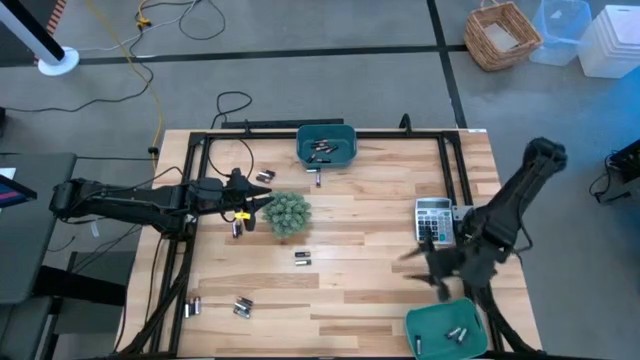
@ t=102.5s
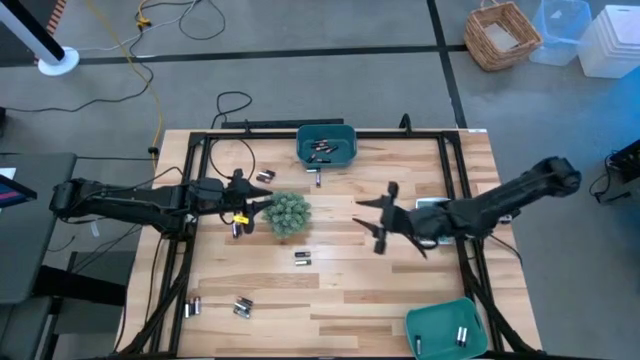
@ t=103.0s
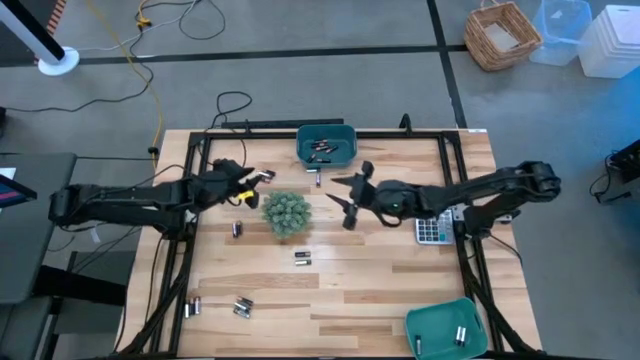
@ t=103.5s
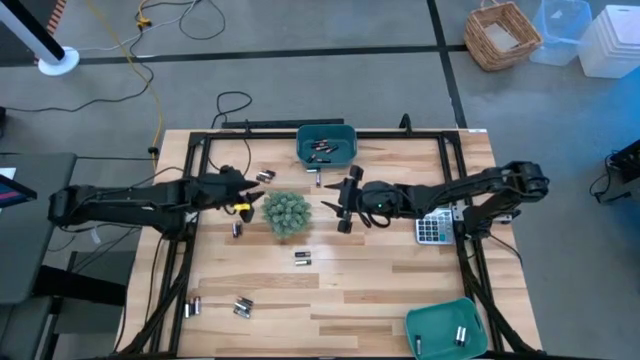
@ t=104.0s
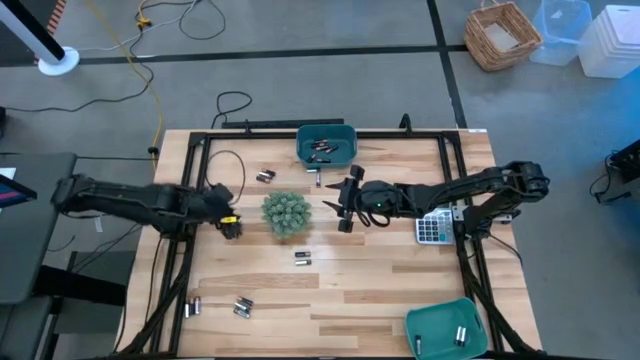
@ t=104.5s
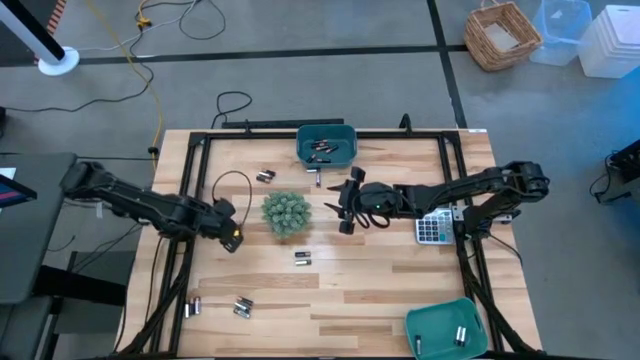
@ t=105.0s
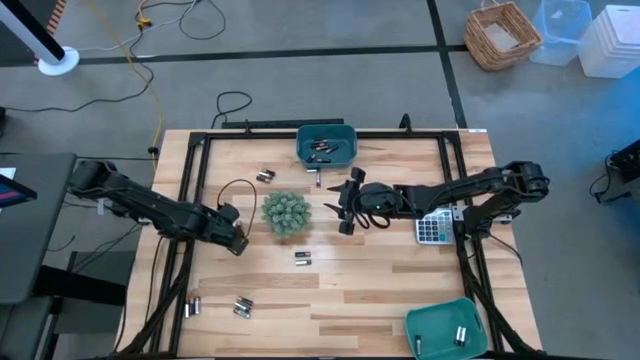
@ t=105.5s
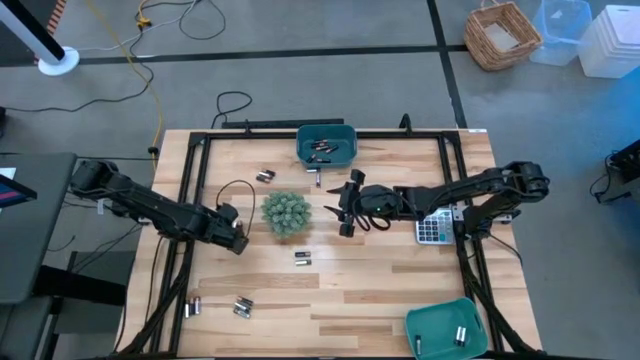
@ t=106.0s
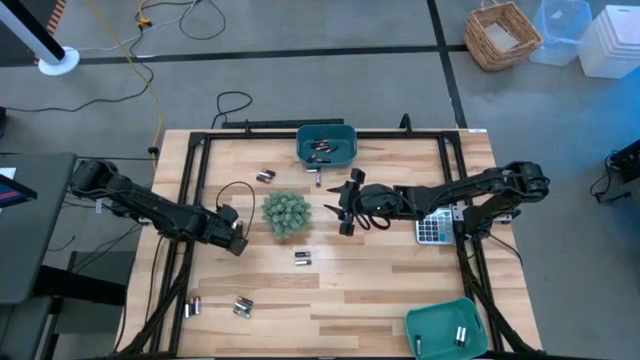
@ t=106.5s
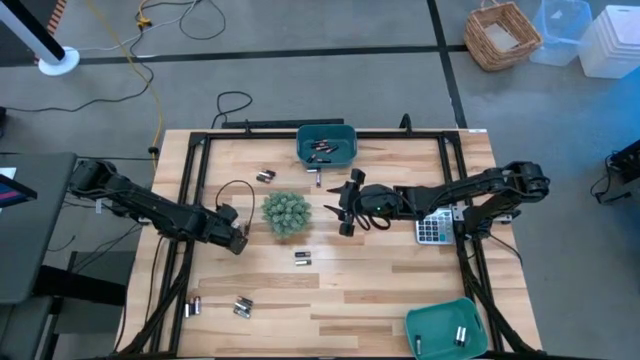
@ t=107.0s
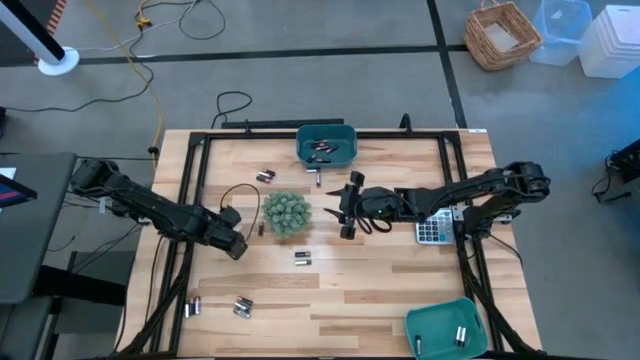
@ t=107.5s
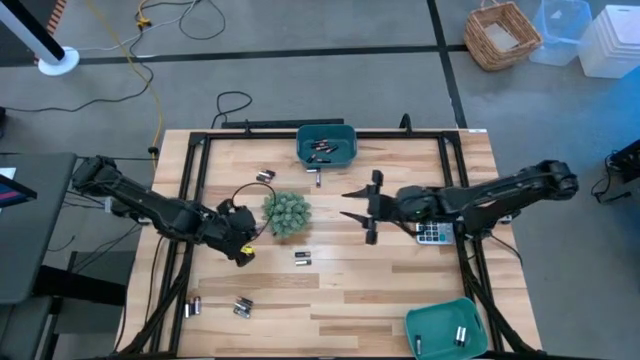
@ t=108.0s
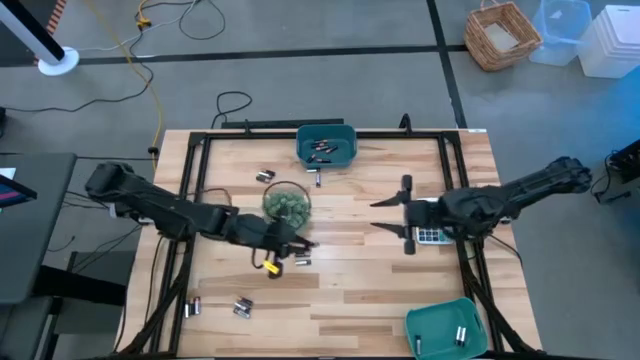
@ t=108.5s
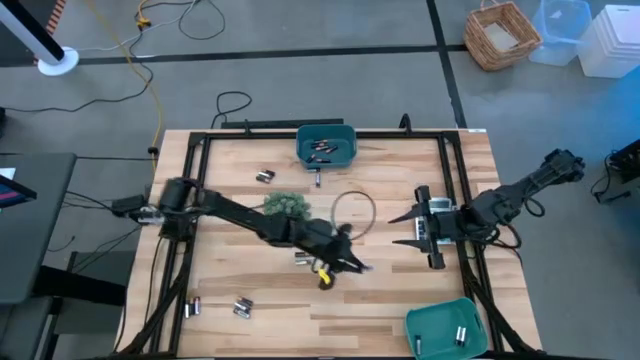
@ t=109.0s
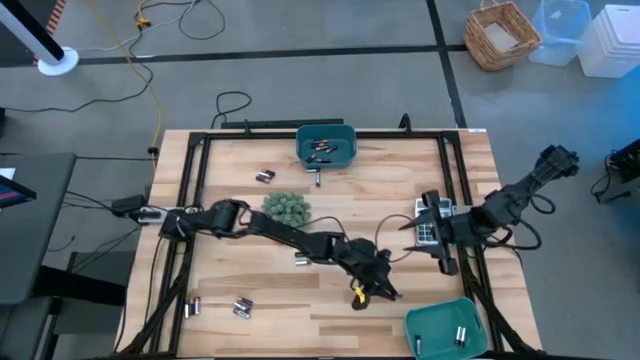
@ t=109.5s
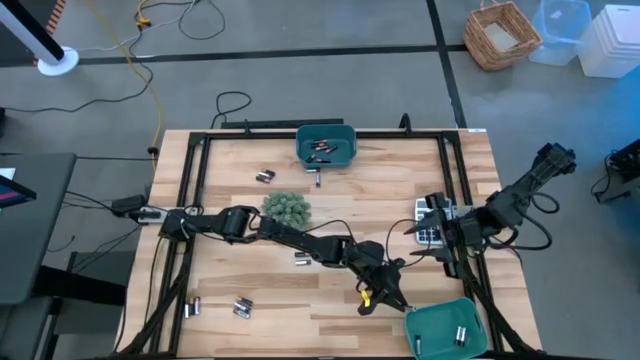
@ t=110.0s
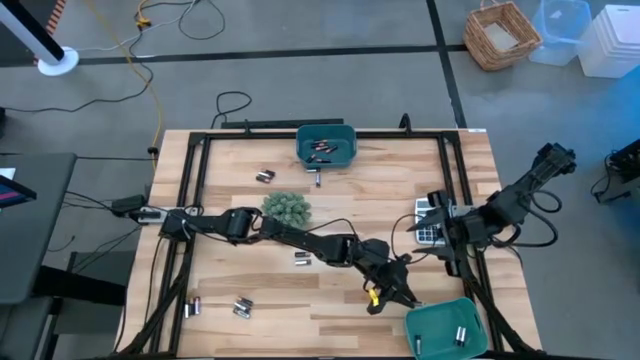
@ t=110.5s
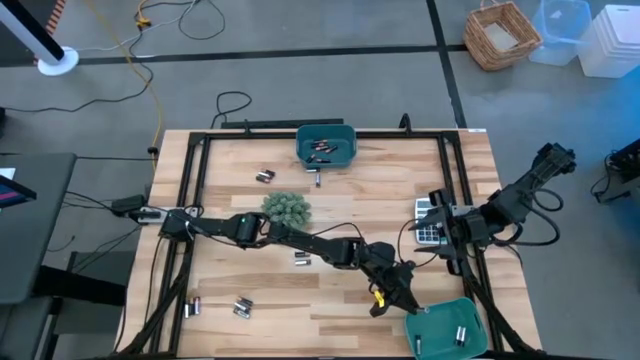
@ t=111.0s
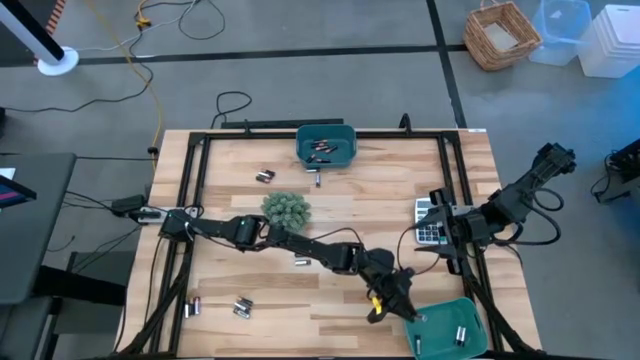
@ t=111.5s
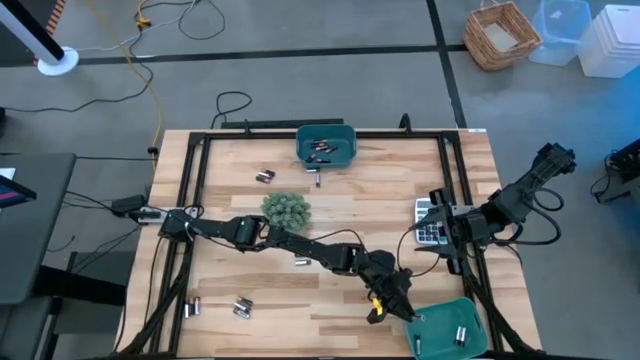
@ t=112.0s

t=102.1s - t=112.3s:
Task: Sort batteries
Put the silver battery into the green bin

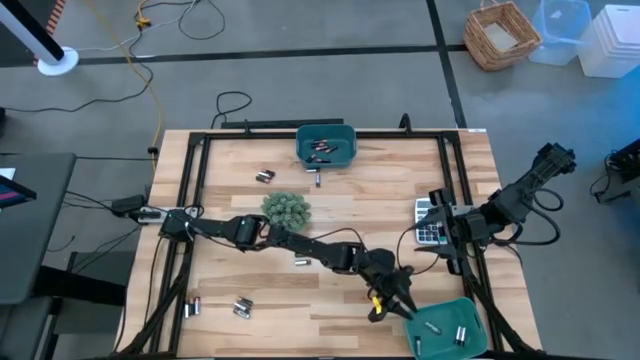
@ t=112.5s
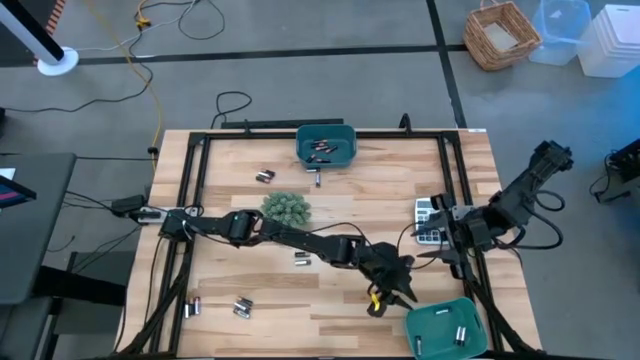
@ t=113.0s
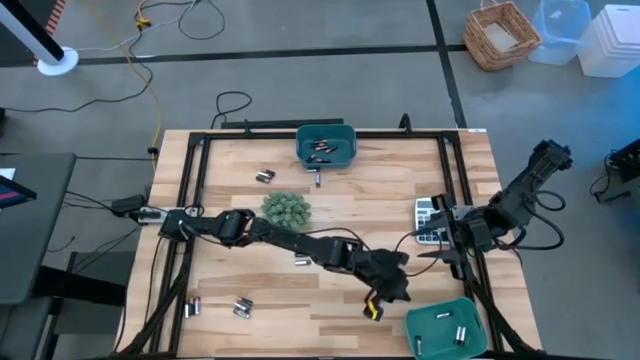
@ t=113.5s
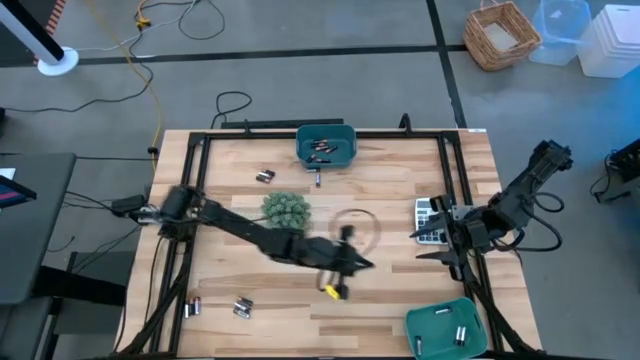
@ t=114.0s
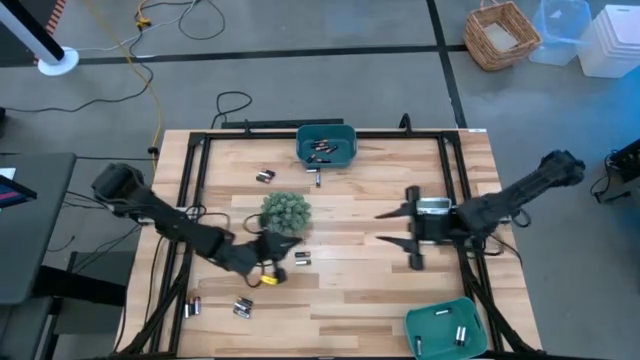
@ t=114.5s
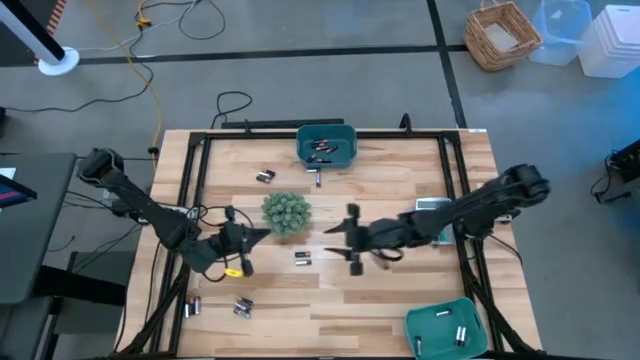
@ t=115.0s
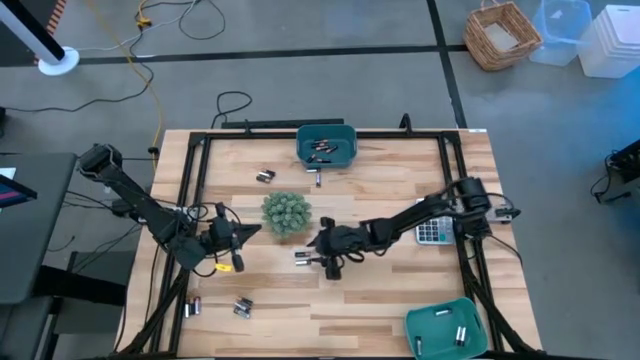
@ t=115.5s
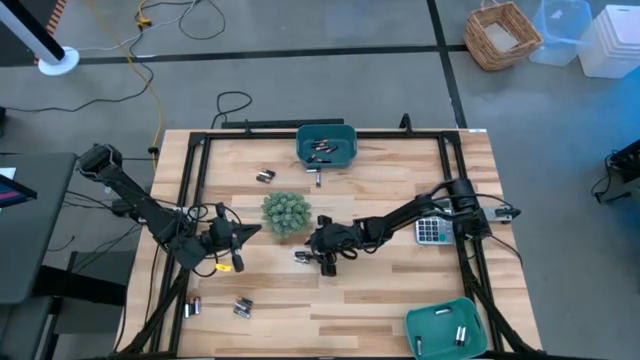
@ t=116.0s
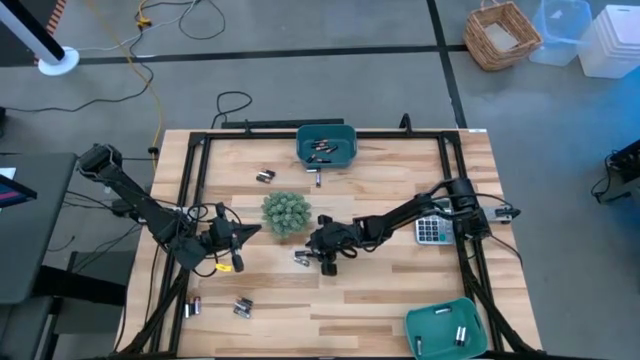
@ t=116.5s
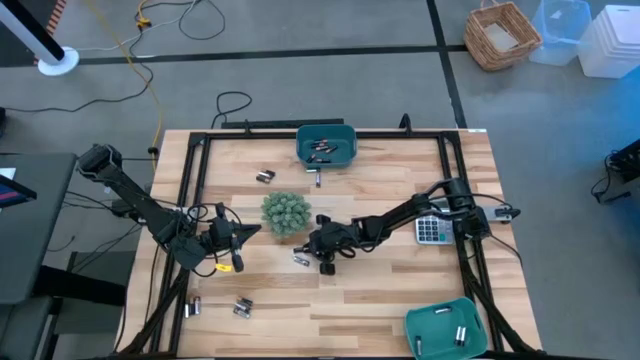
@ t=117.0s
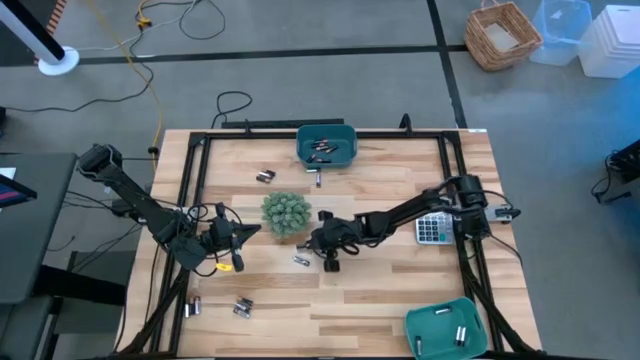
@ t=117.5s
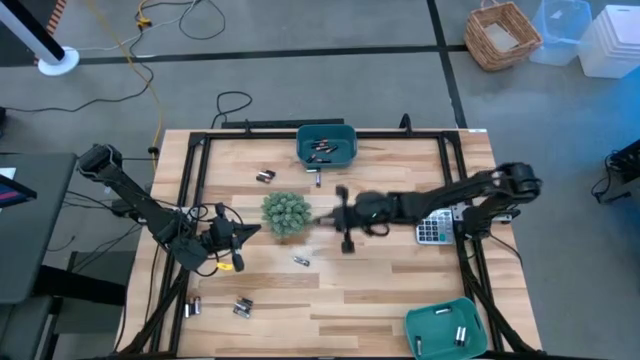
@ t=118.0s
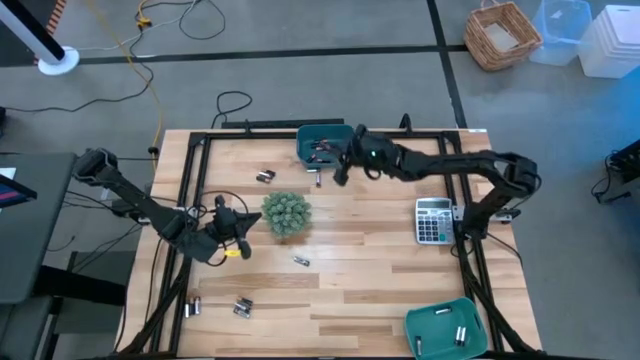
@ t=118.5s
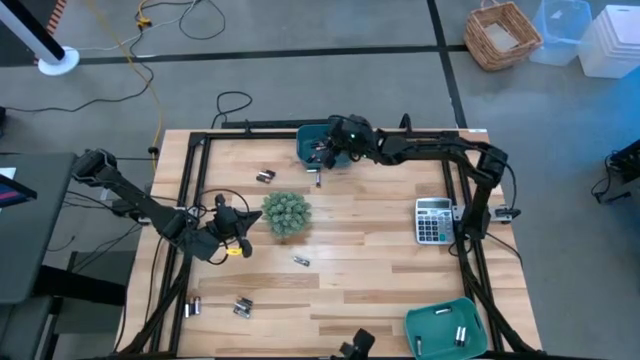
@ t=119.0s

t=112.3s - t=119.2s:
Put the black battery into the blue bin

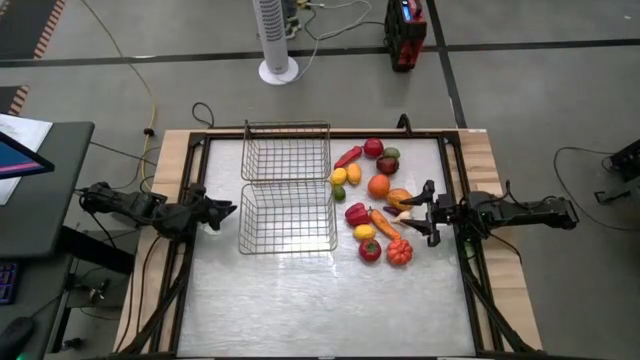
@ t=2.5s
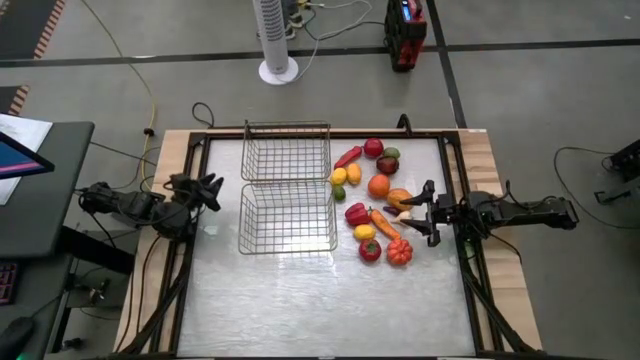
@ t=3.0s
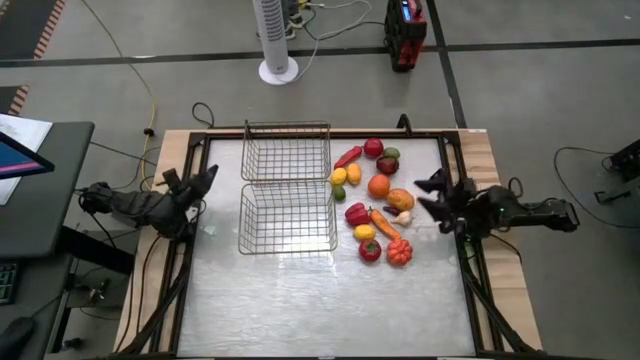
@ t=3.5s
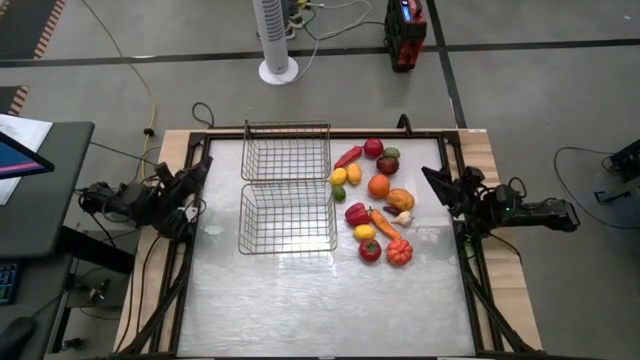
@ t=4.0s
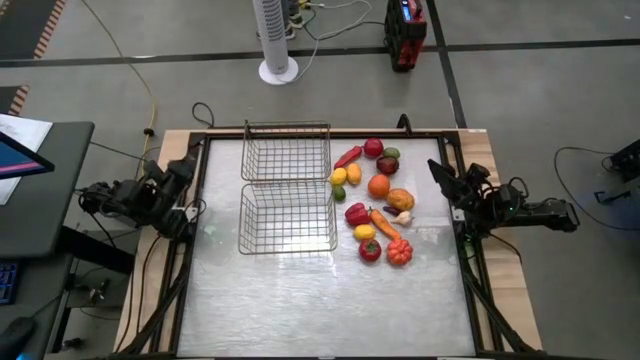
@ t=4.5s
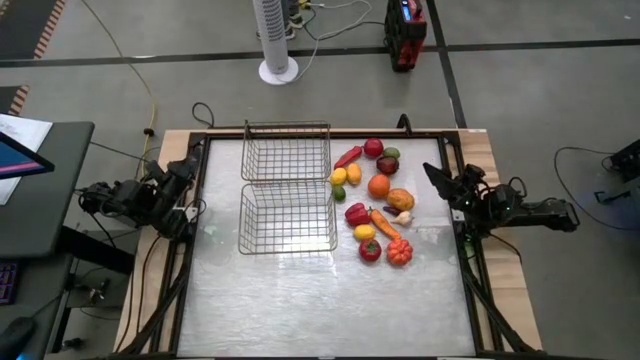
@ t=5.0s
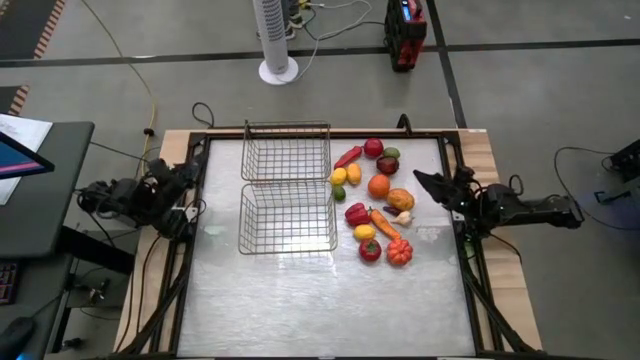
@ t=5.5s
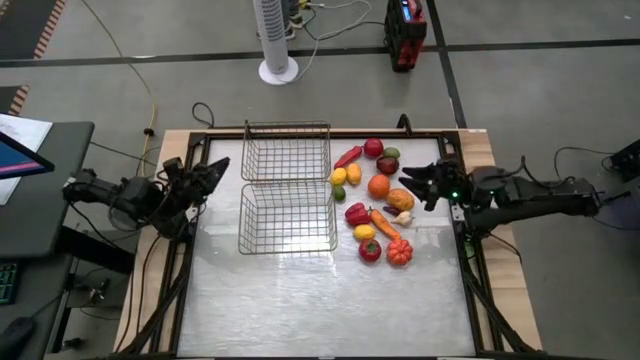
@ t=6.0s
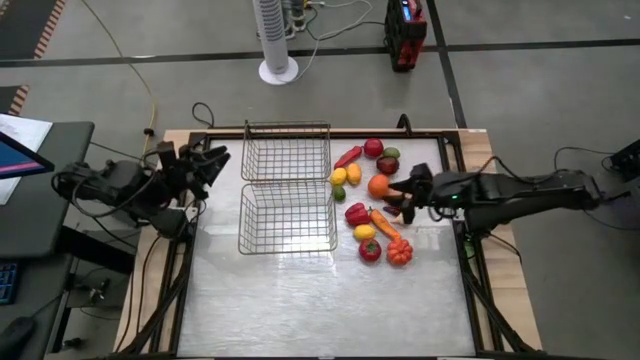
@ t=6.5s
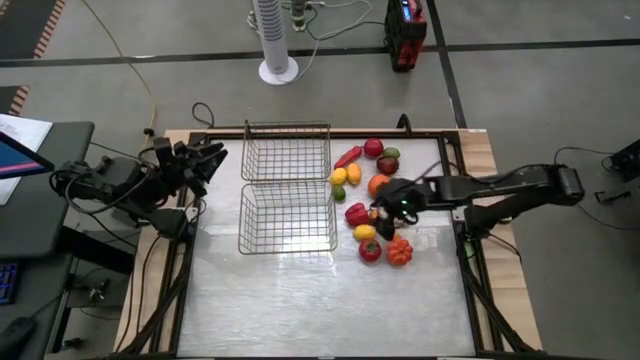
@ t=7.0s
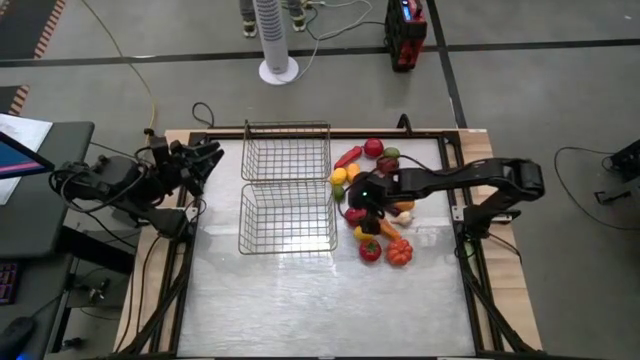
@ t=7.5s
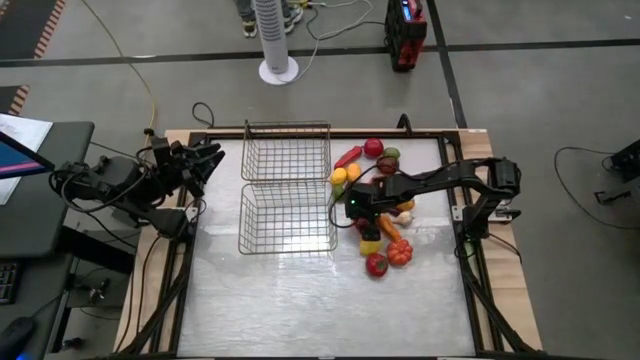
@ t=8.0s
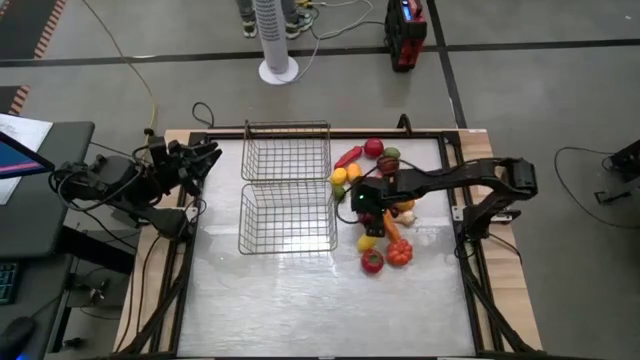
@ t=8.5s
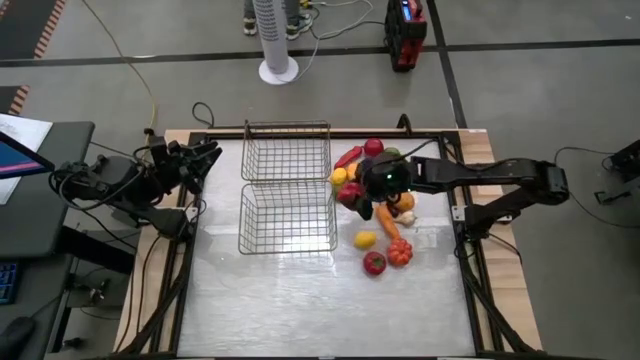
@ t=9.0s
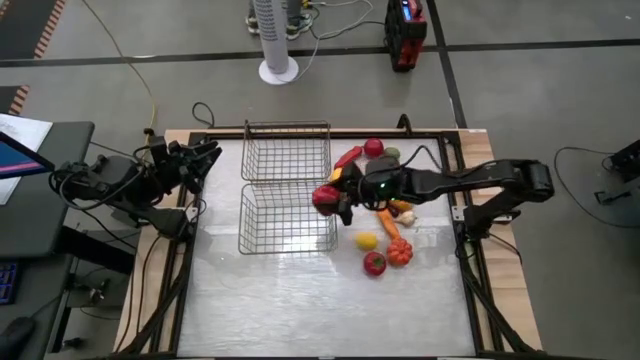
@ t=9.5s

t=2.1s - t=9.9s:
Task: Sort produce into baskets
Put the red bell pepper into the bottom mesh basket
